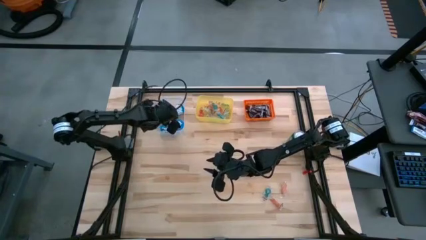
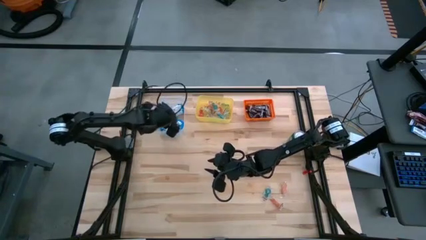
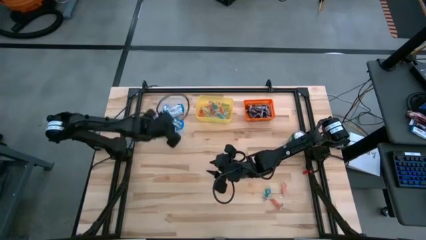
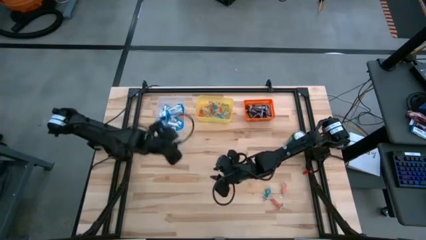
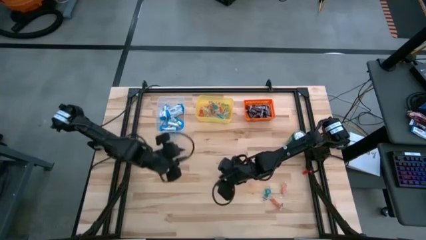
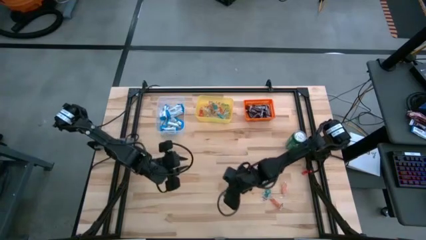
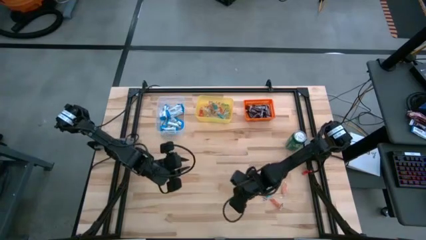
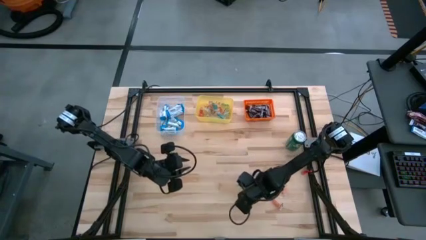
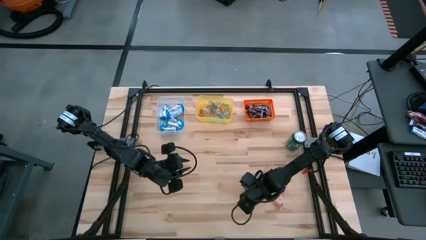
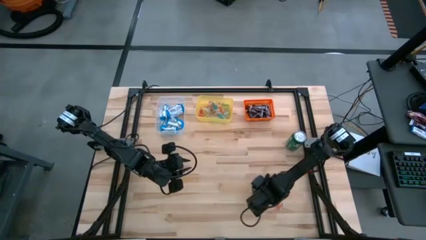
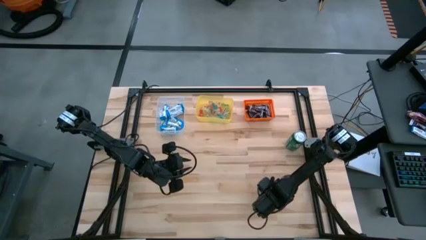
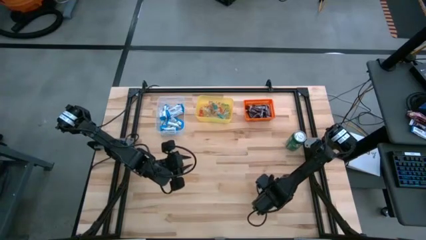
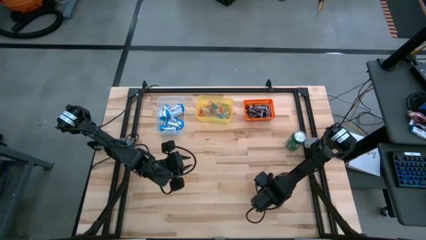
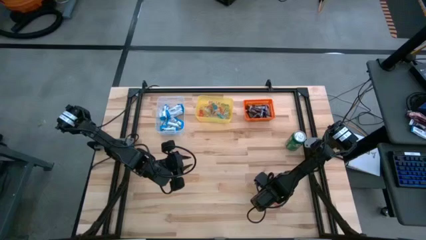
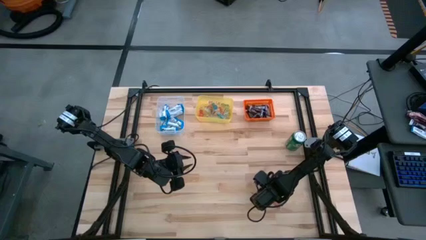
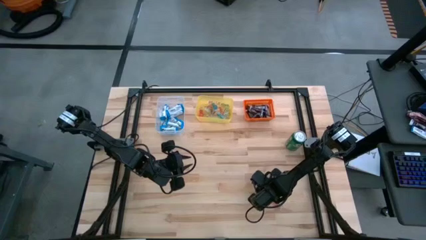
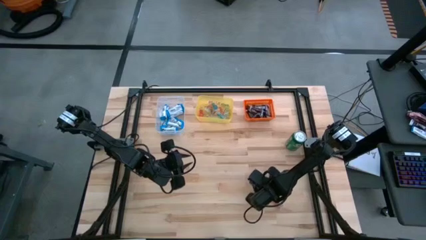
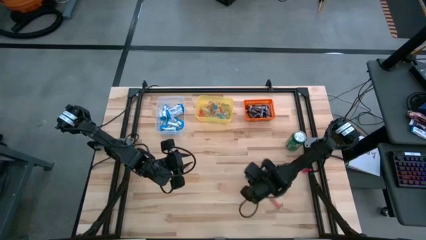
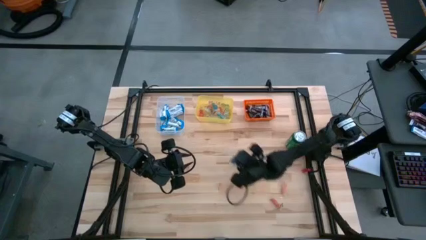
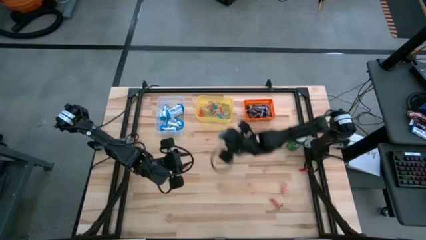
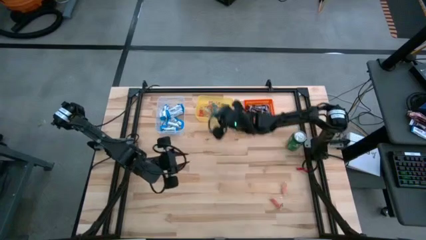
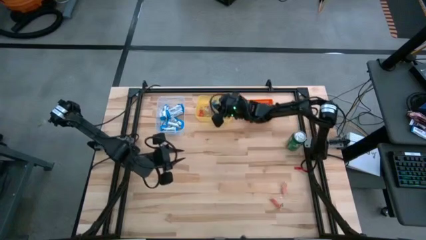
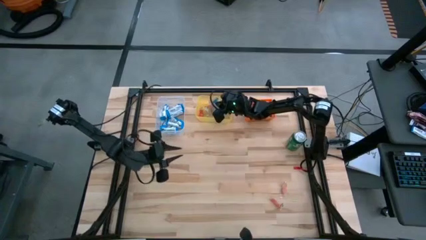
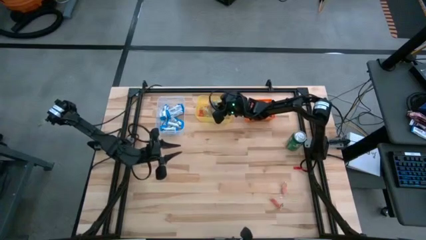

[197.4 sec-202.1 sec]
Task: Sort candy
Put the blue gummy into the yellow bin

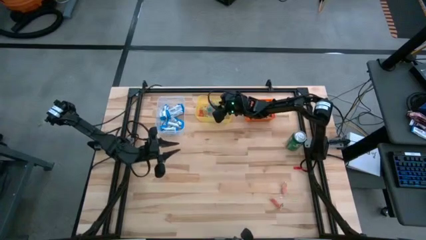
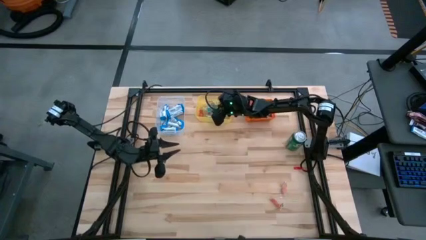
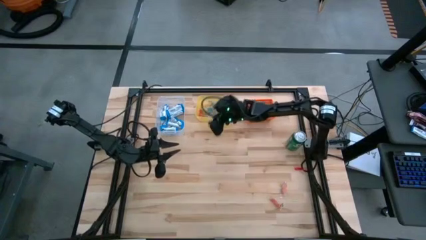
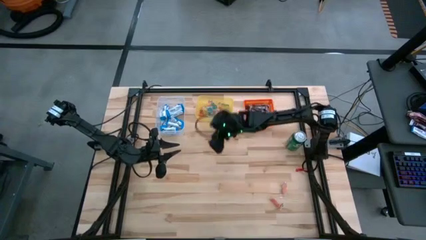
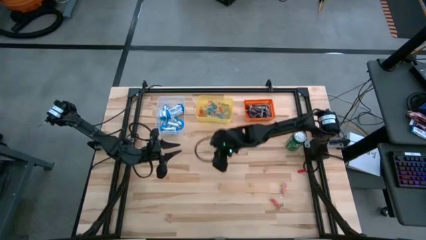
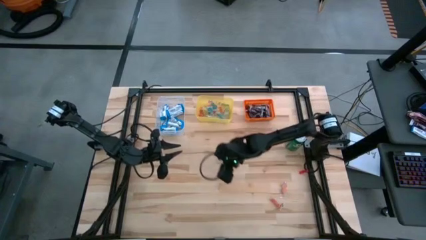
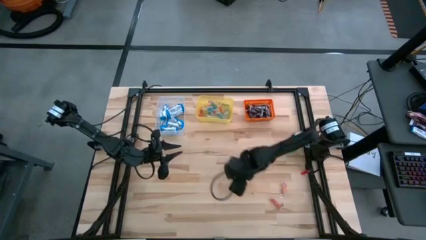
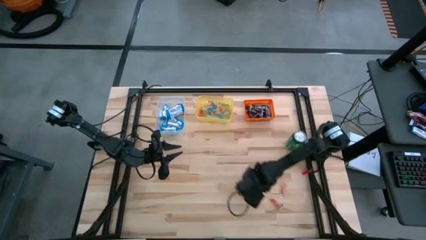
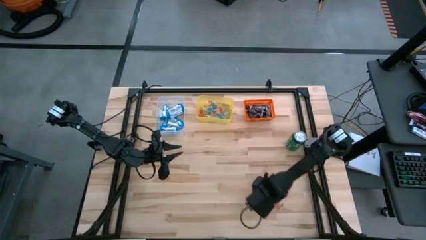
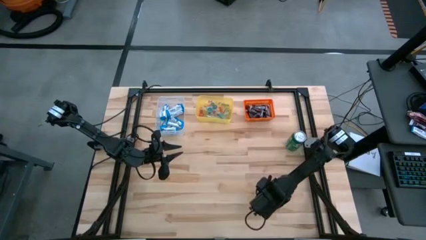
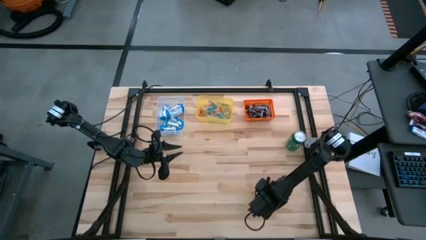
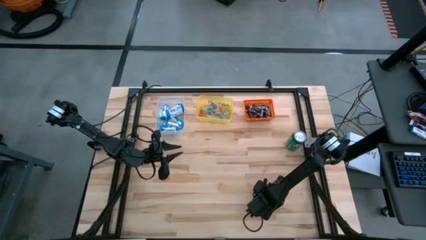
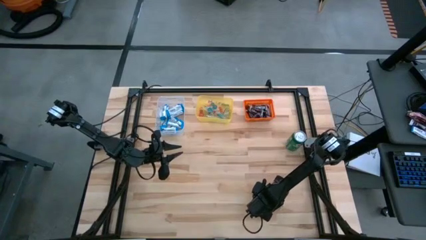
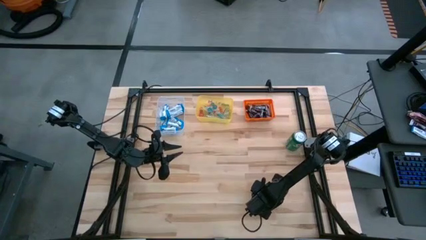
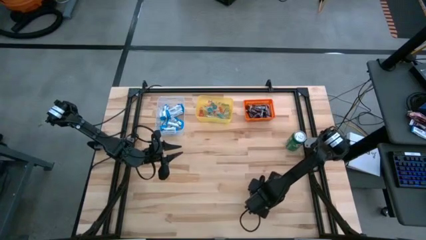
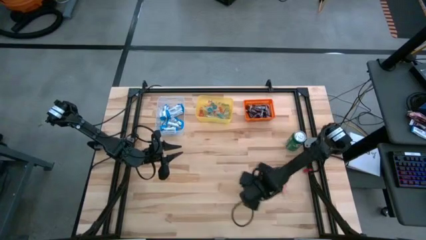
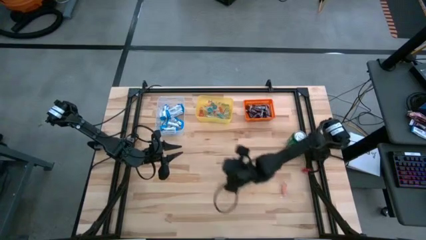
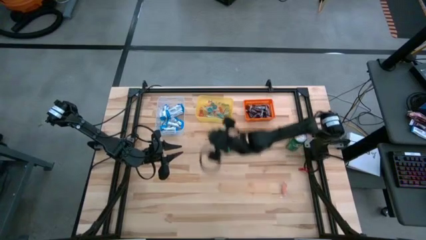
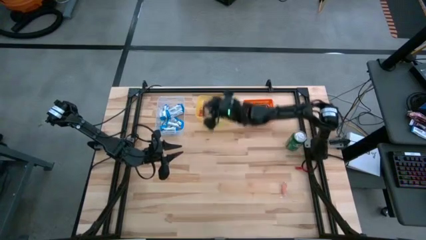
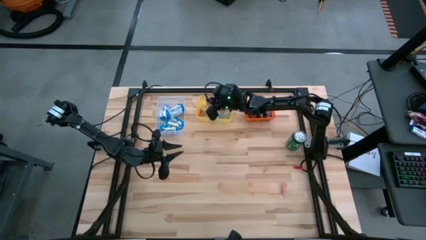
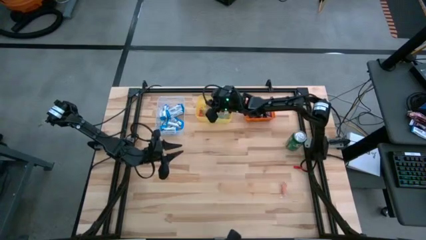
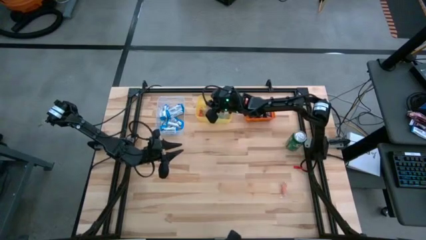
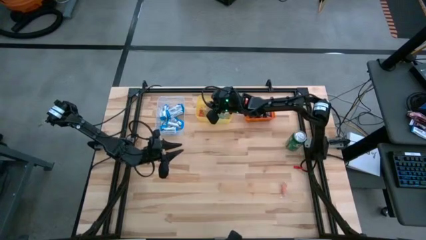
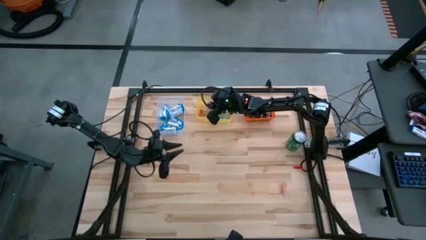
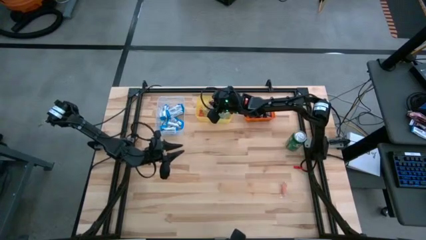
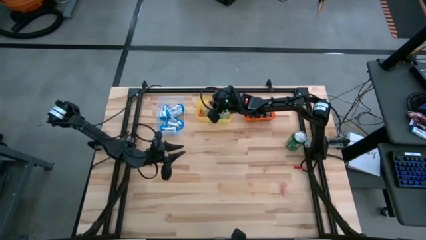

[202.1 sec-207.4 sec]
Put the orange gummy into the yellow bin

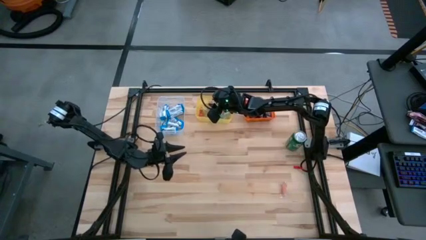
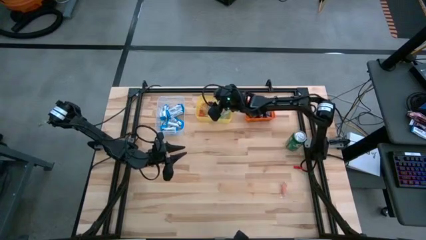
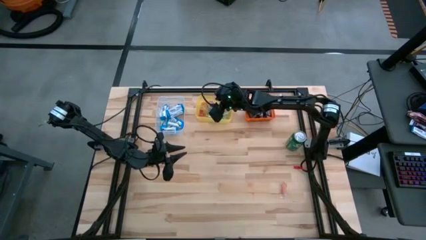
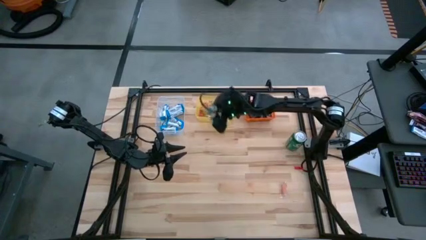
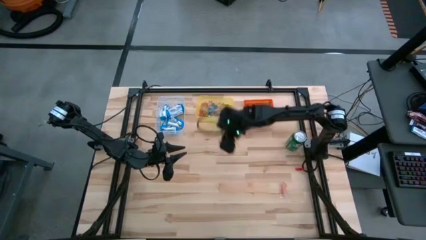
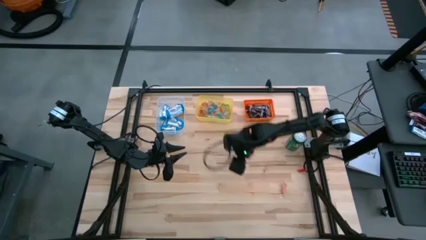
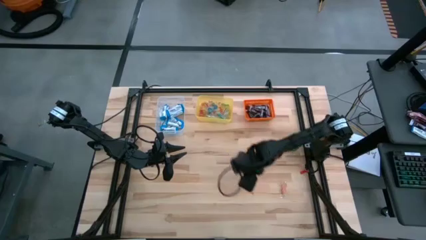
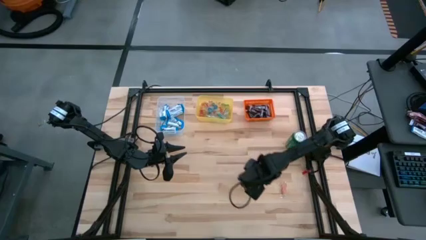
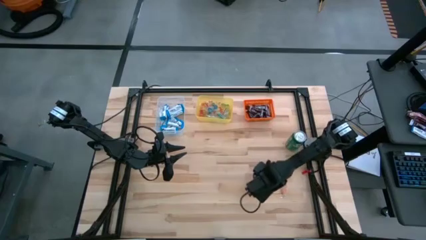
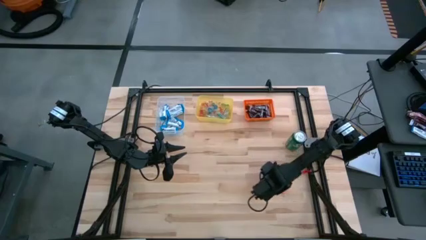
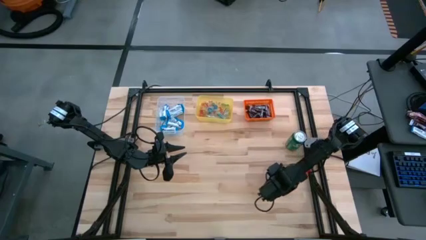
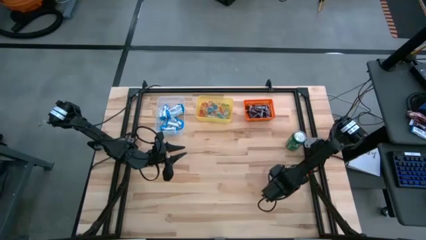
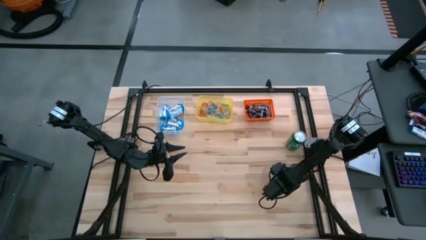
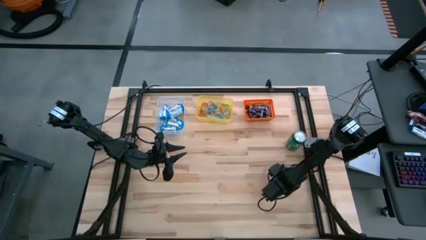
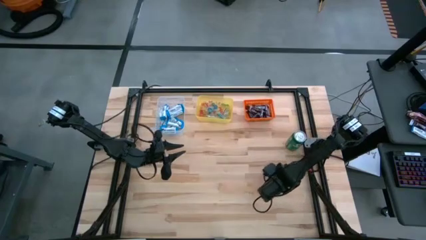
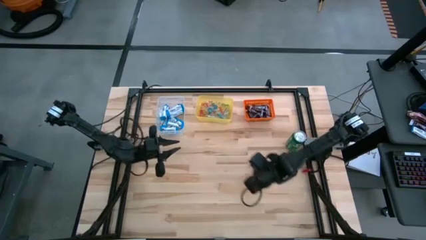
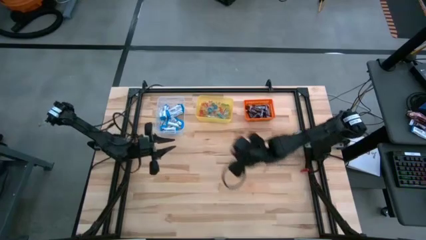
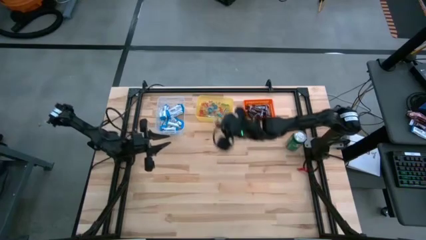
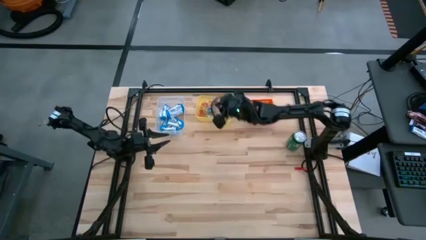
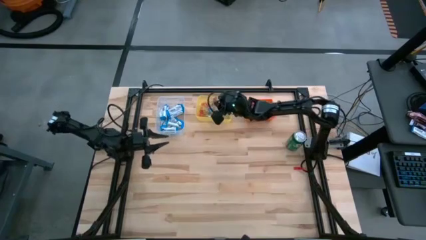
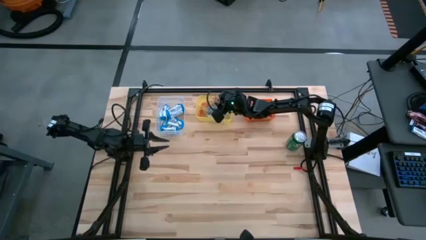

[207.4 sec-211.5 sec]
Put the orange gummy into the yellow bin

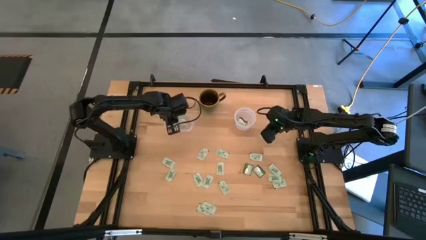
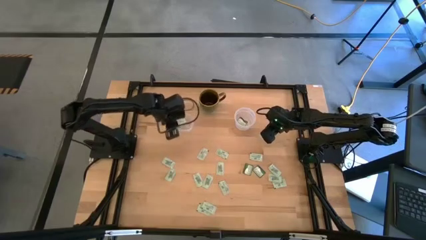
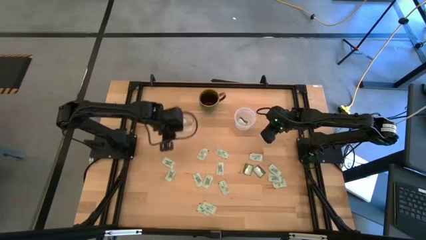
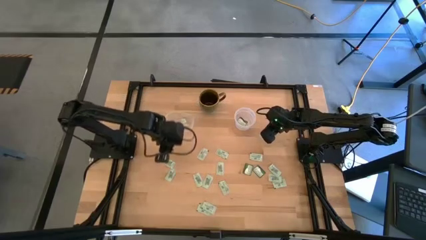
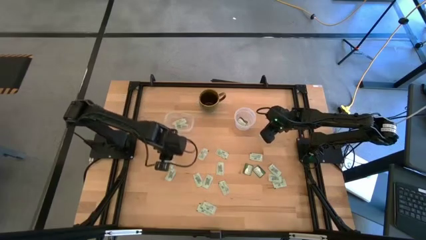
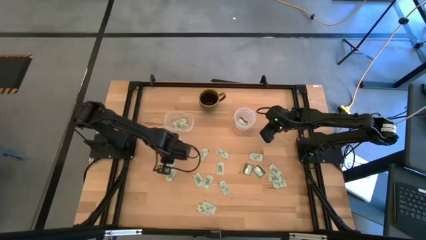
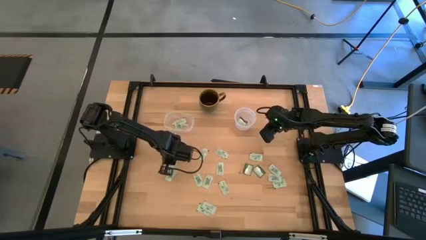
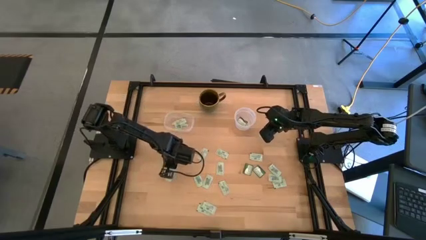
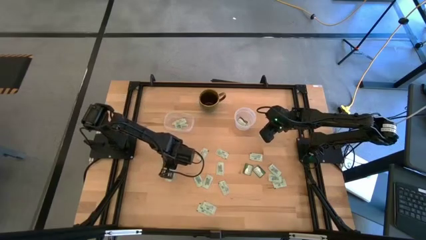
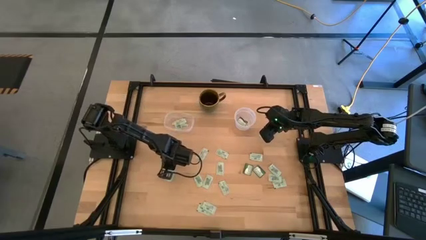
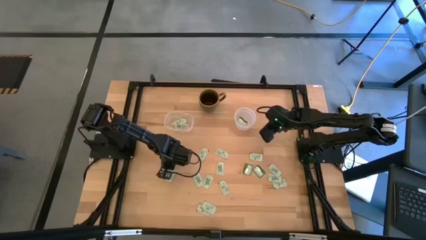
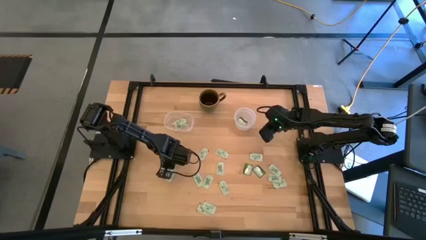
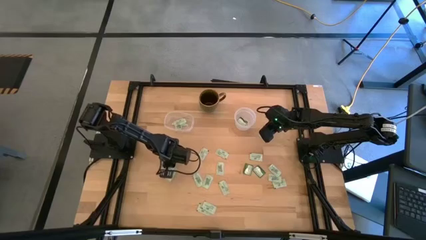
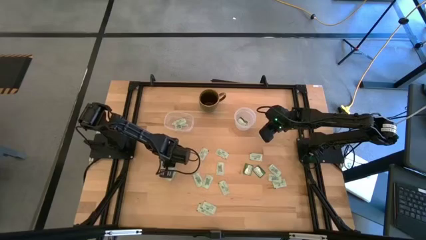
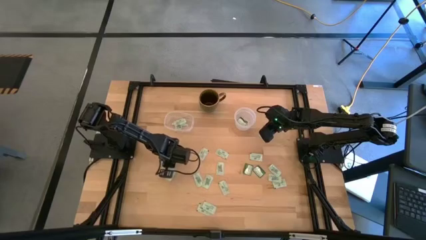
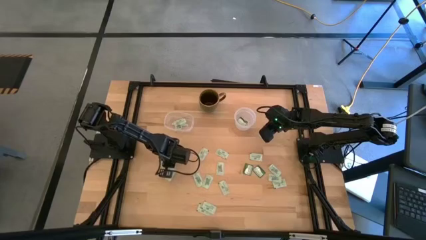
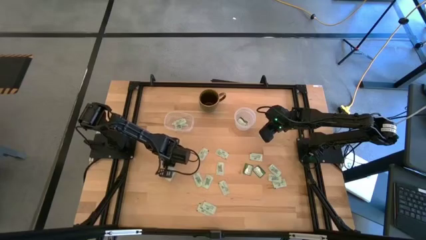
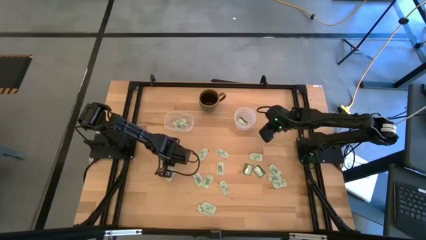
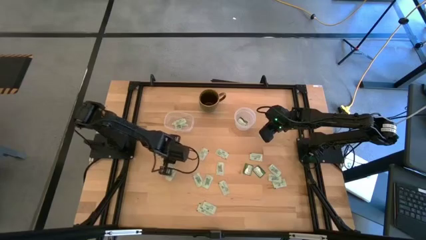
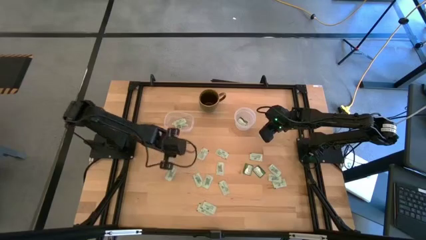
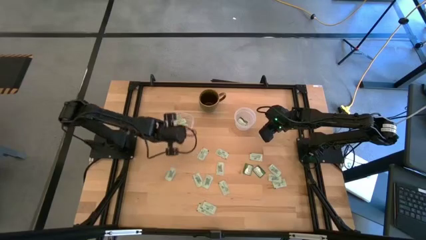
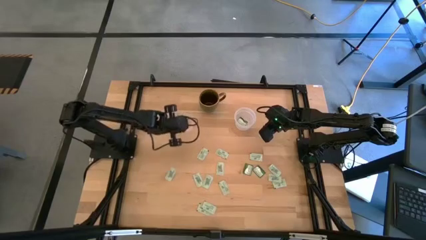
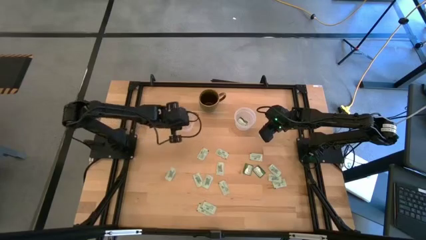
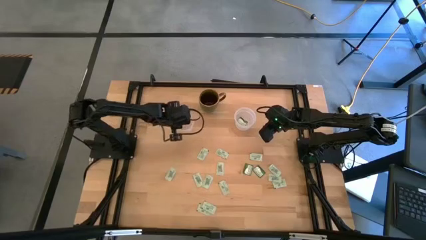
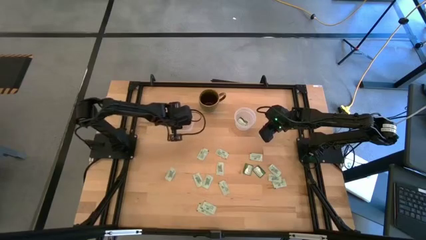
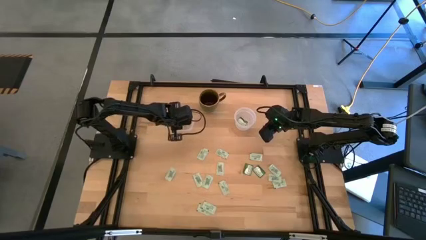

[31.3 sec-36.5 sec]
Task: Pick and place Stevia / Truvia into bins
Put the light green stevia packet into the left transparent container
